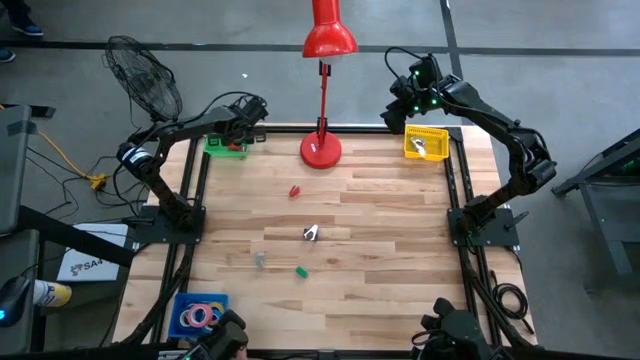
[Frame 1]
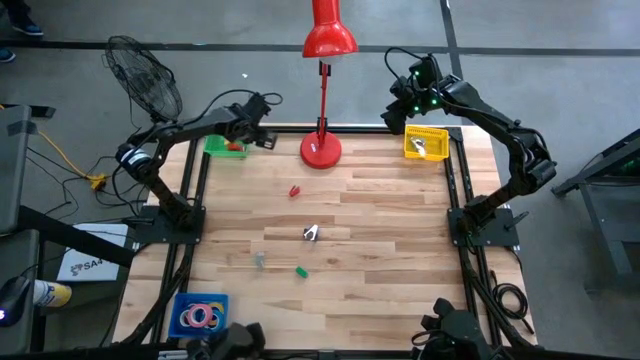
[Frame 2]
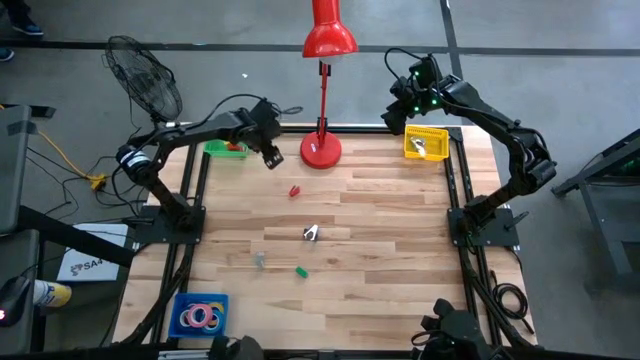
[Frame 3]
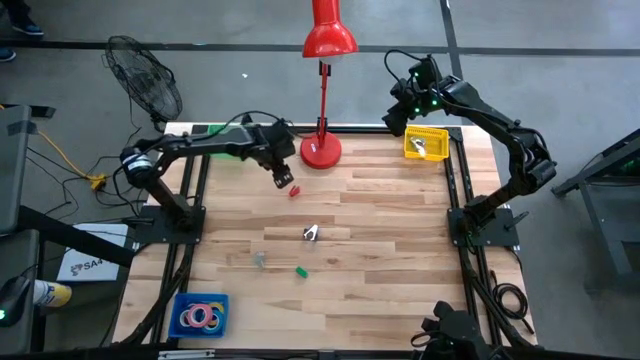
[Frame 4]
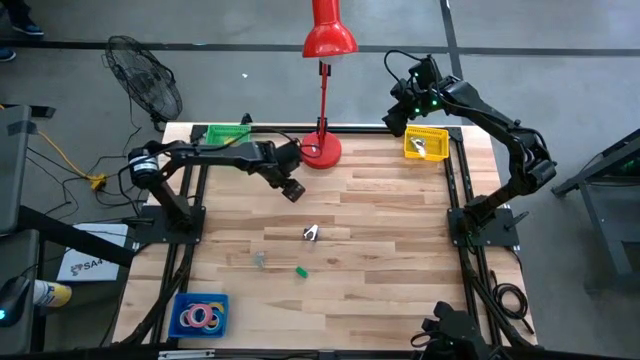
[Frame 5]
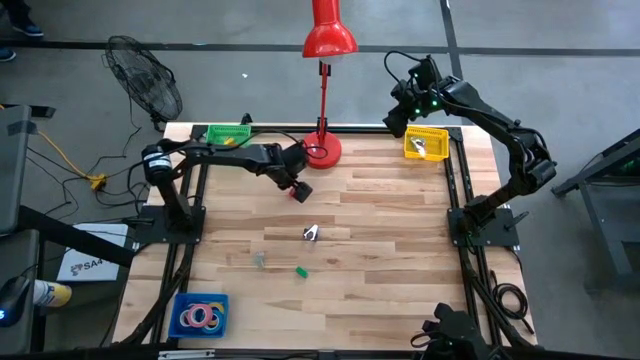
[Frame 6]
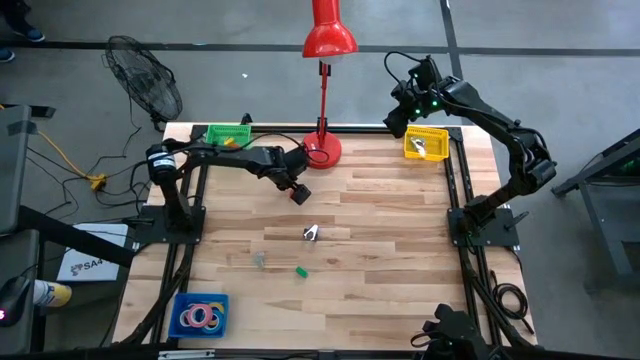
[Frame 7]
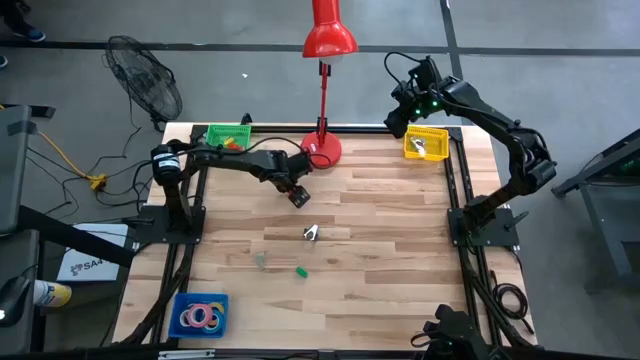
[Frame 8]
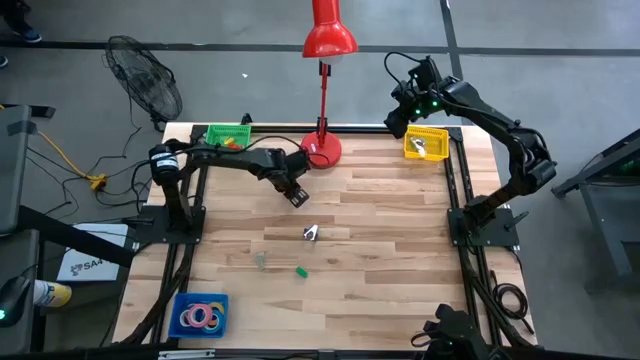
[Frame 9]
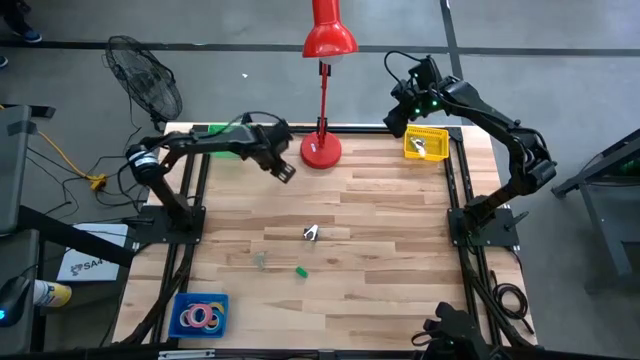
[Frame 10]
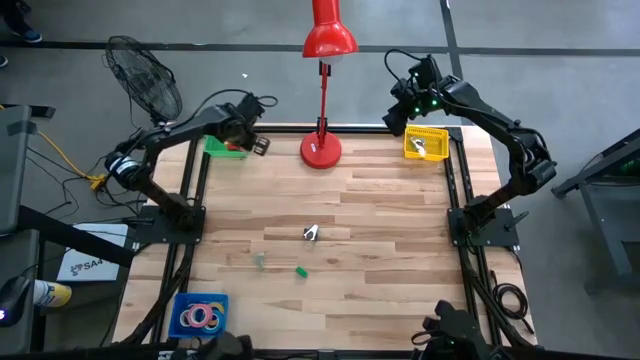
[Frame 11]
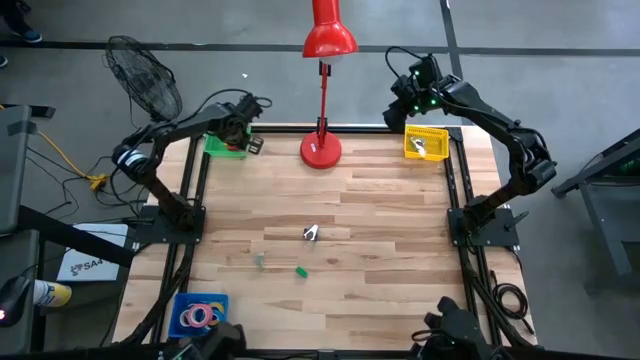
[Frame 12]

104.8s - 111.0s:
Task: Pick and place Stapler, Stapler remover, tape
Put the red stapler into the green basket

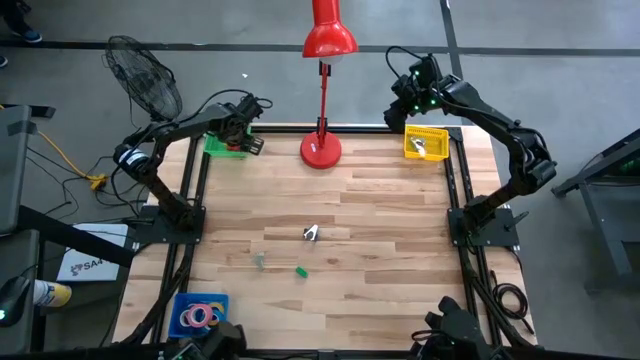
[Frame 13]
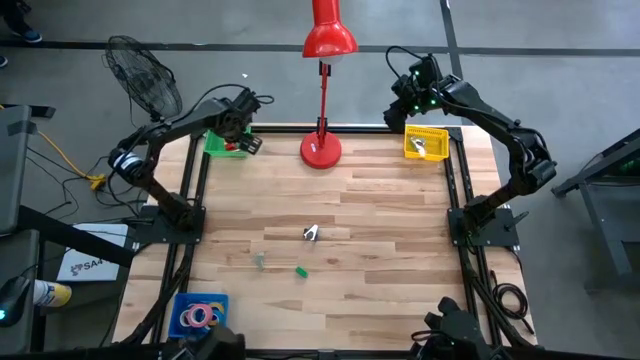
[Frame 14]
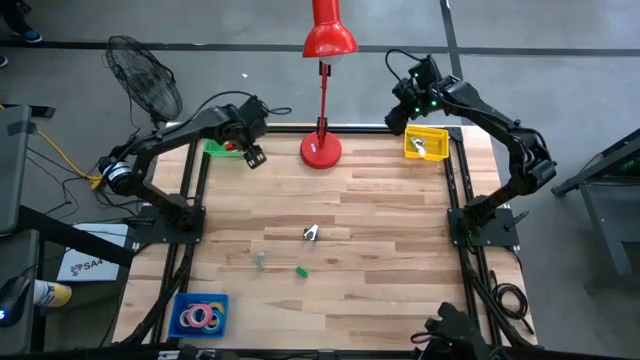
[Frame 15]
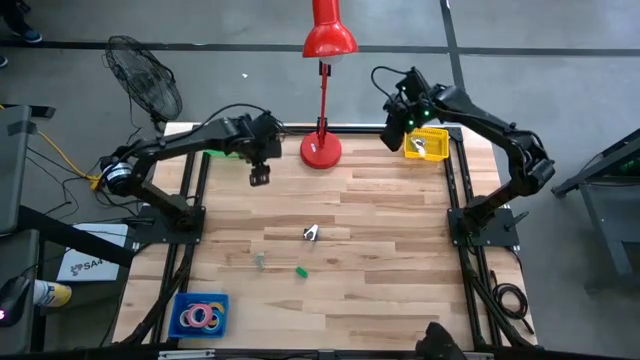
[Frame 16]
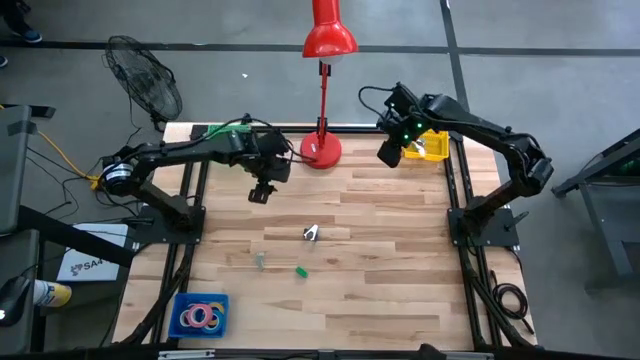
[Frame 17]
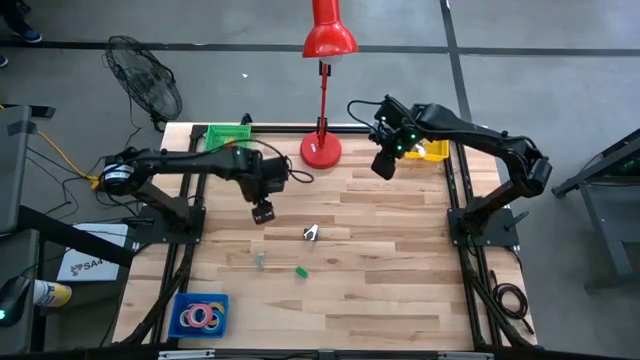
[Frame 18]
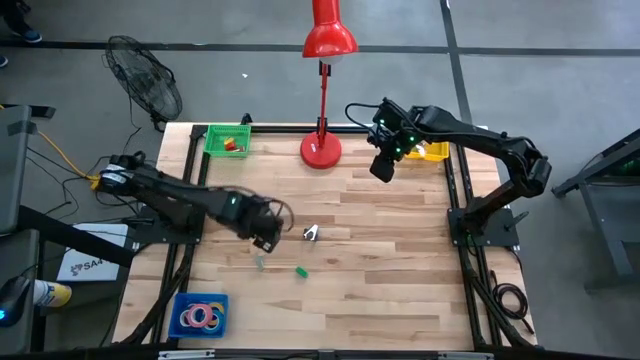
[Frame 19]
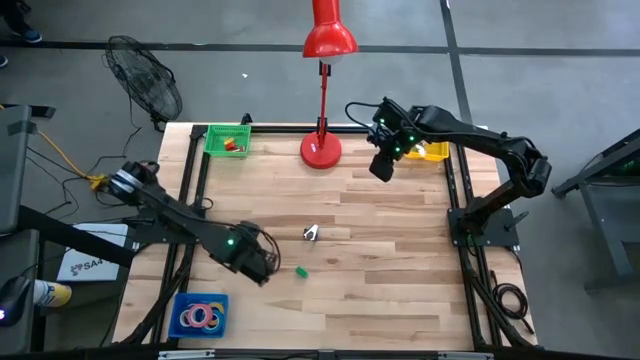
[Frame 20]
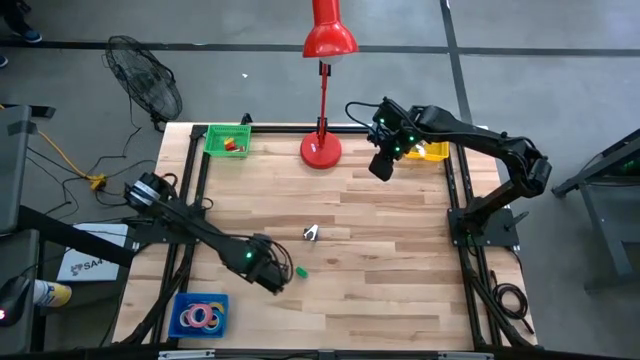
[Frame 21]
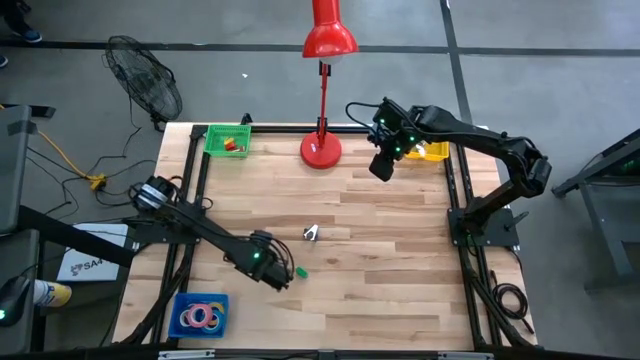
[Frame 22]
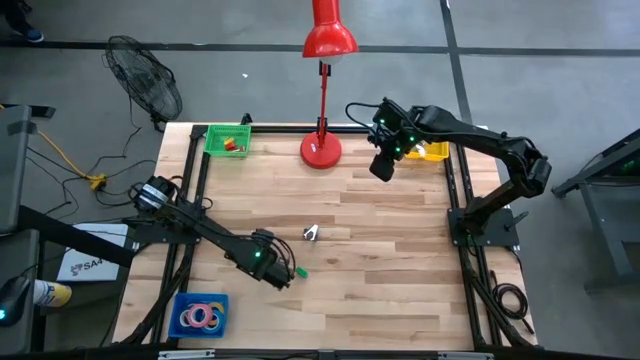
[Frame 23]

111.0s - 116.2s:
Put the gray staple remover into the yellow basket

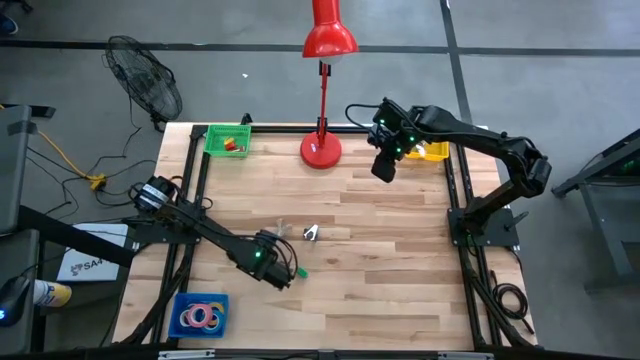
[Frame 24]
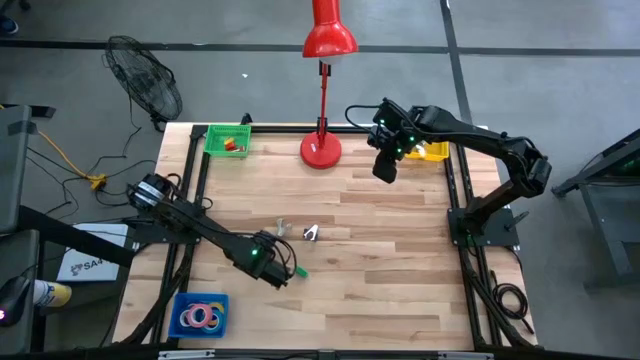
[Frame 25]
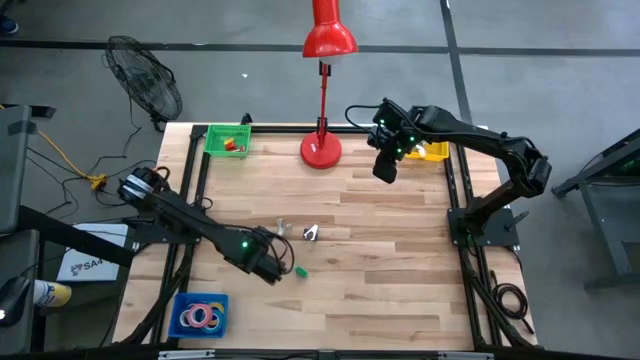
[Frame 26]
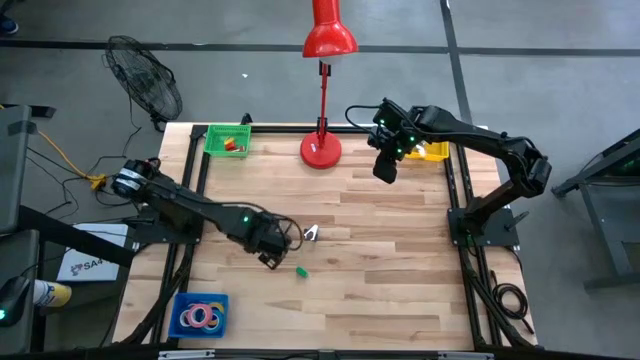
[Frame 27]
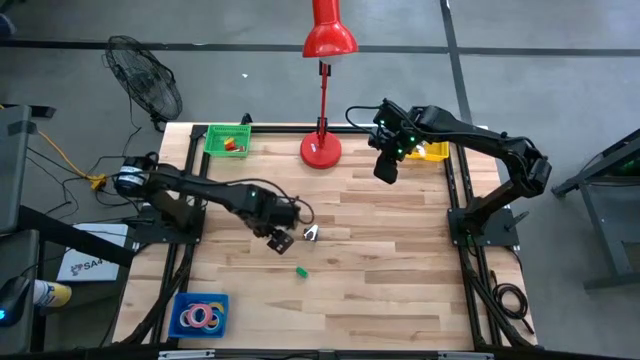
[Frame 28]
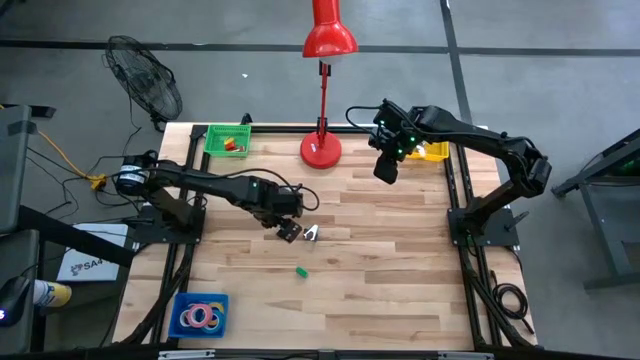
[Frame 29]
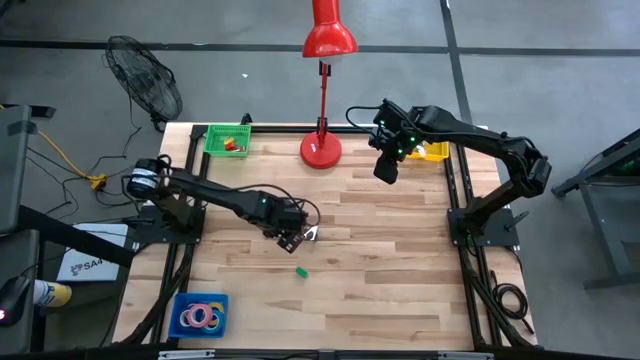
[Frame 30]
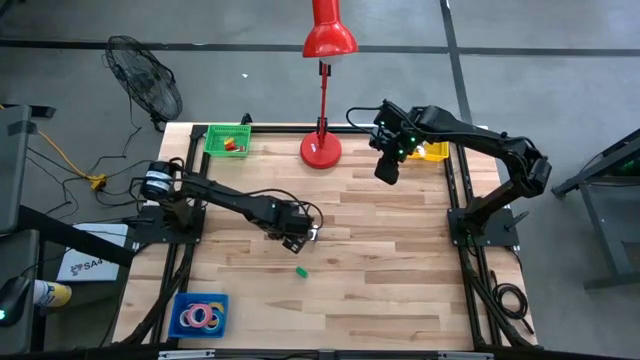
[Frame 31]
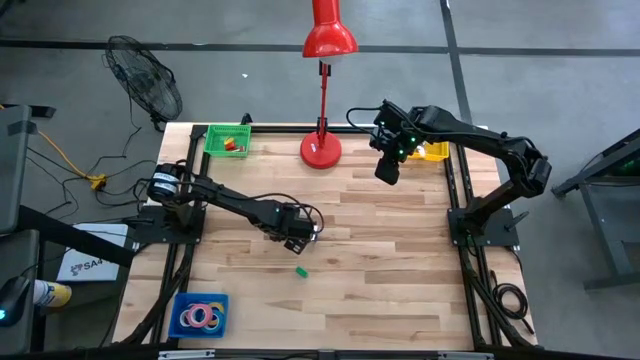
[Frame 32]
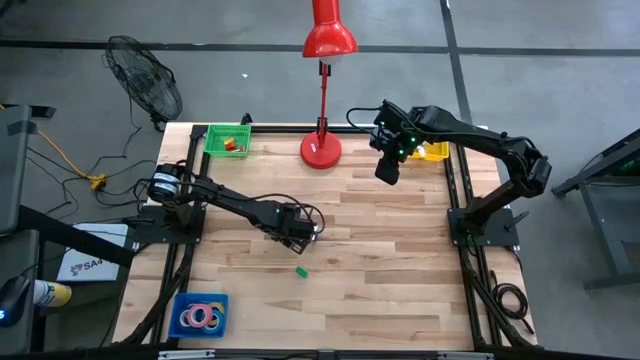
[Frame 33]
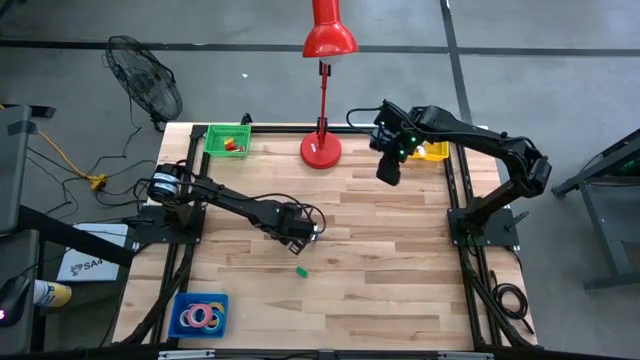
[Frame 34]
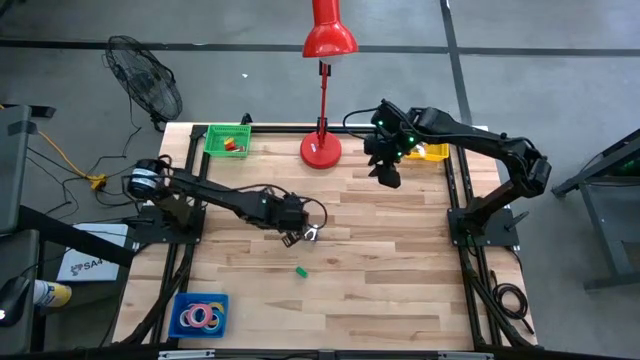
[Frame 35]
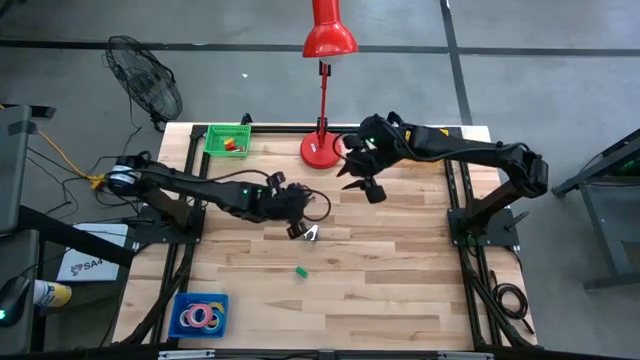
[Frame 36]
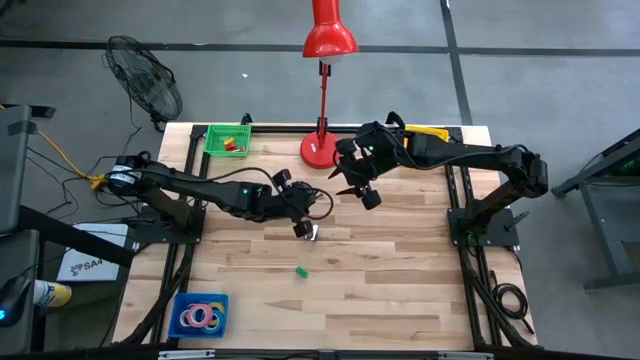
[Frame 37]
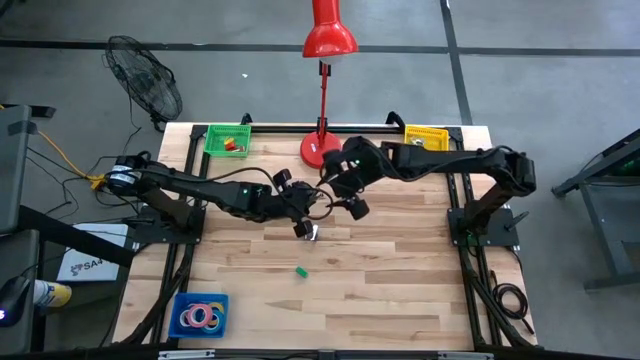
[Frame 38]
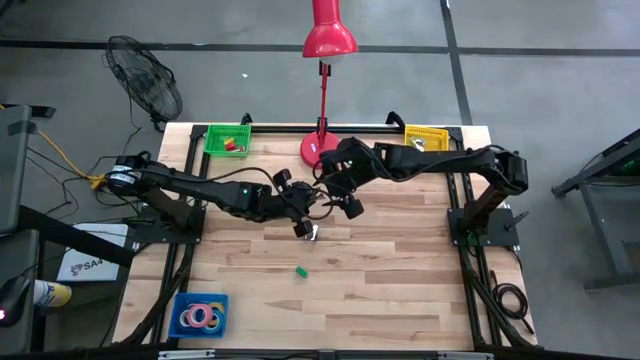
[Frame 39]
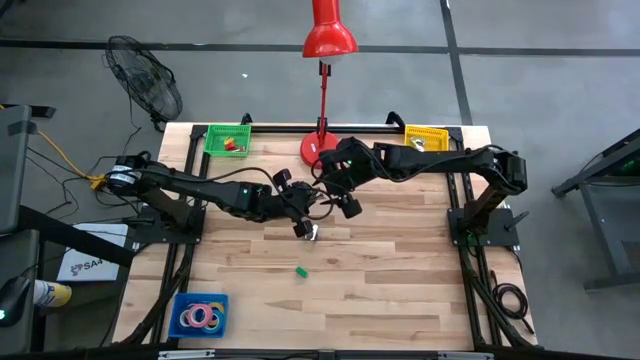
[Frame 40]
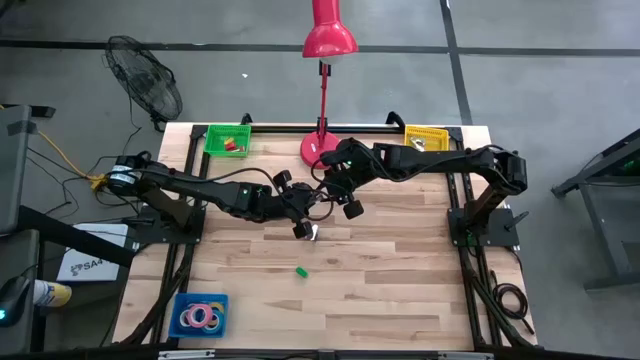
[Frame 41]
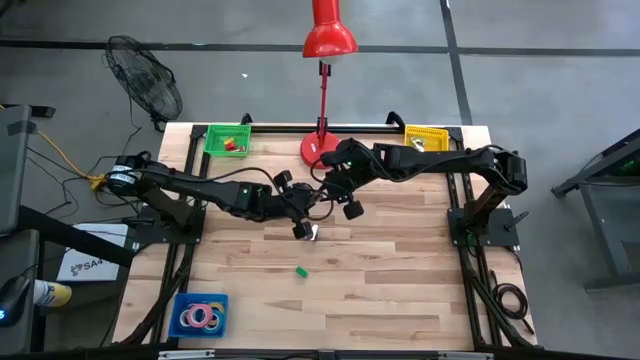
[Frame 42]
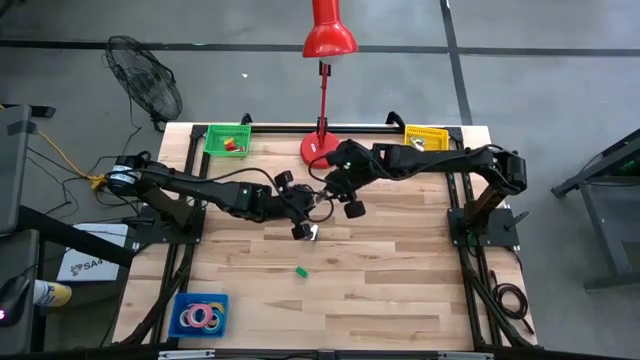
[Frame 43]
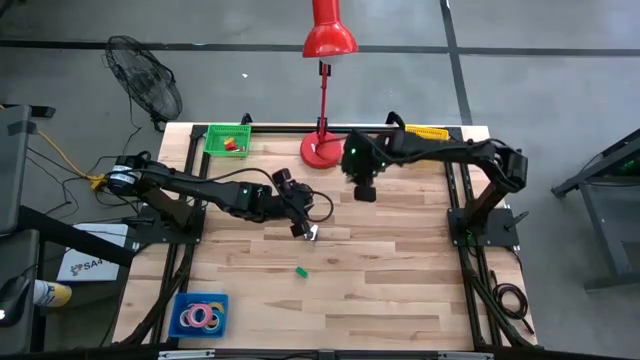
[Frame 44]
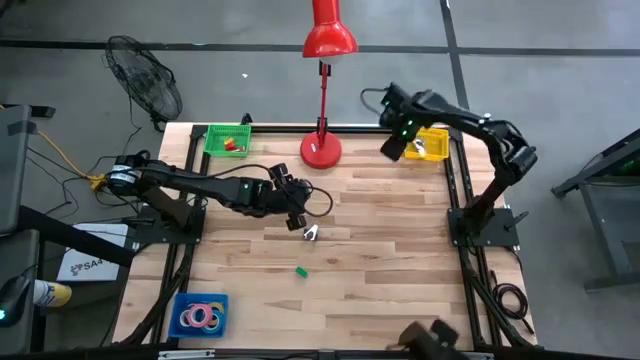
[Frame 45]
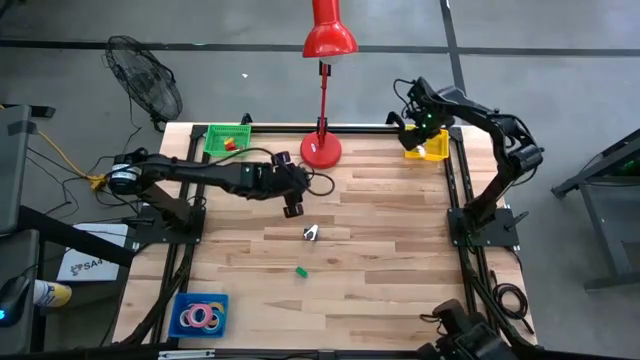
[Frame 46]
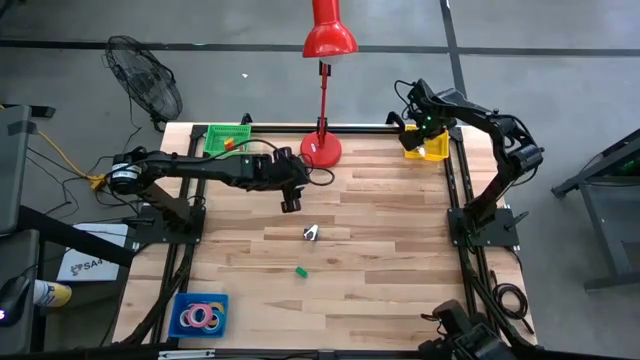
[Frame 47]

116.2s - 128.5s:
Put the gray staple remover into the yellow basket
